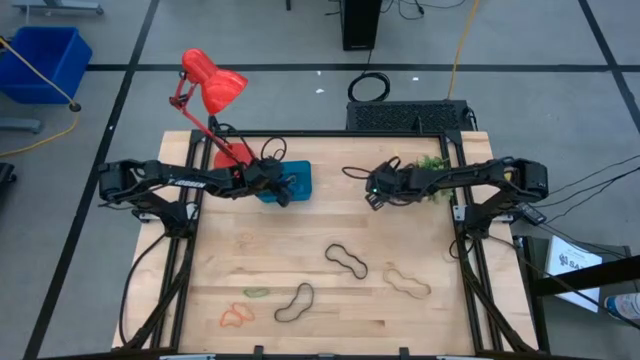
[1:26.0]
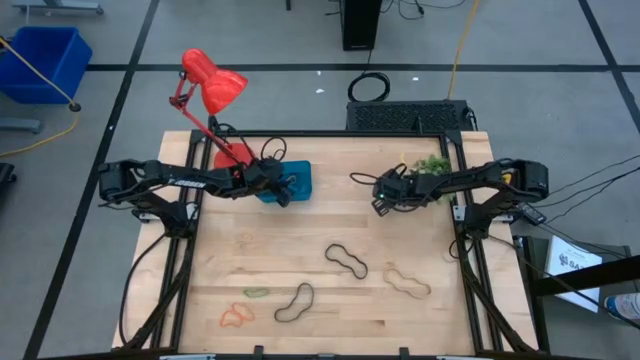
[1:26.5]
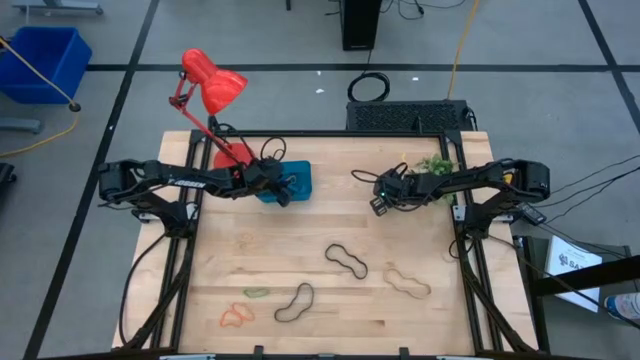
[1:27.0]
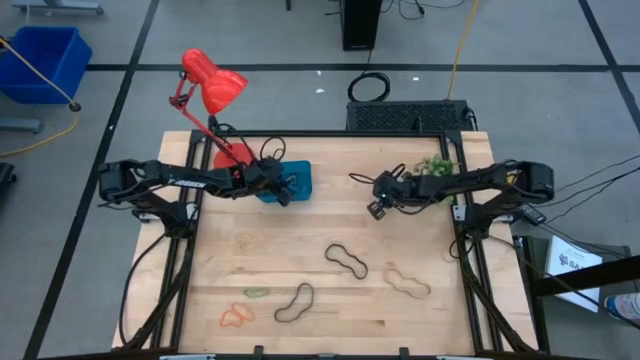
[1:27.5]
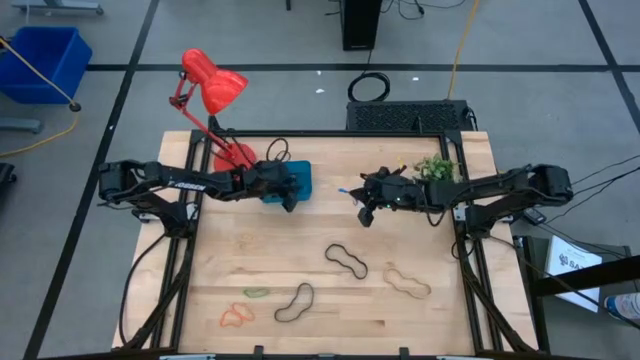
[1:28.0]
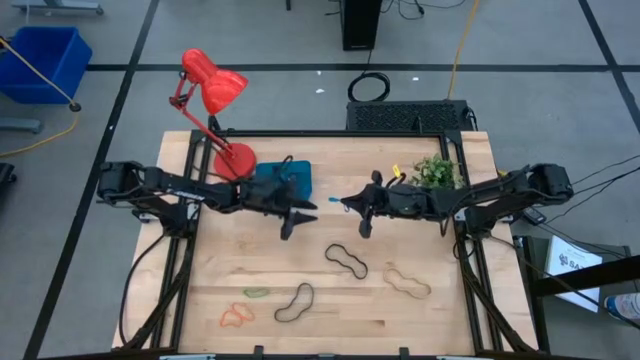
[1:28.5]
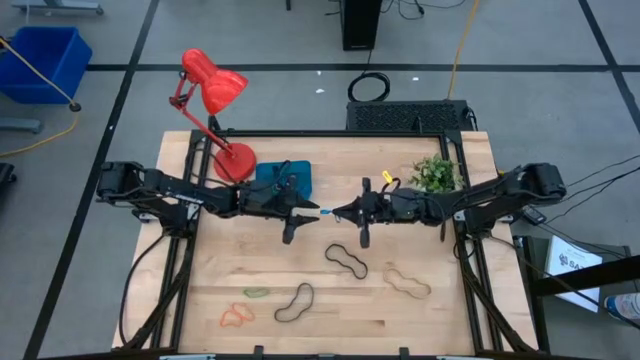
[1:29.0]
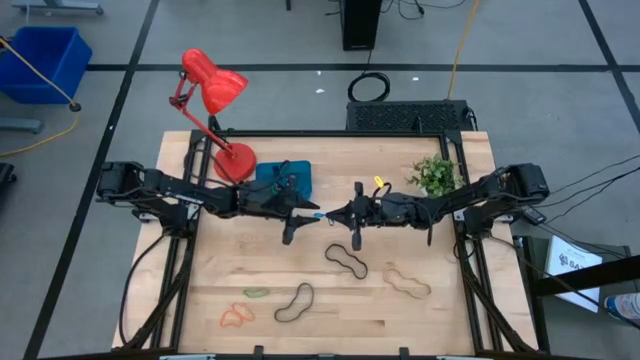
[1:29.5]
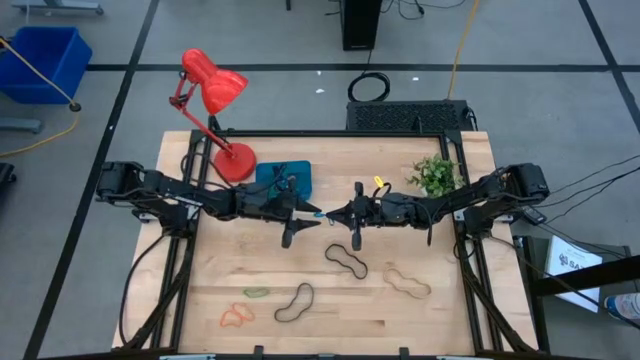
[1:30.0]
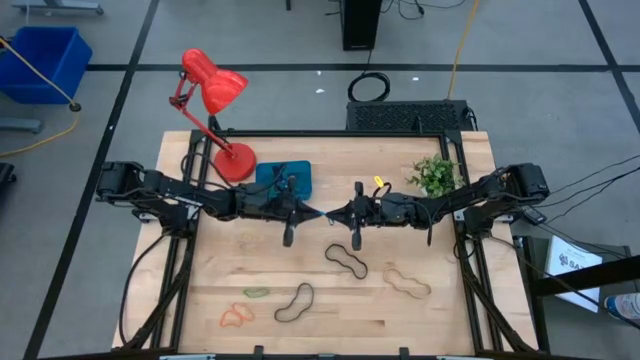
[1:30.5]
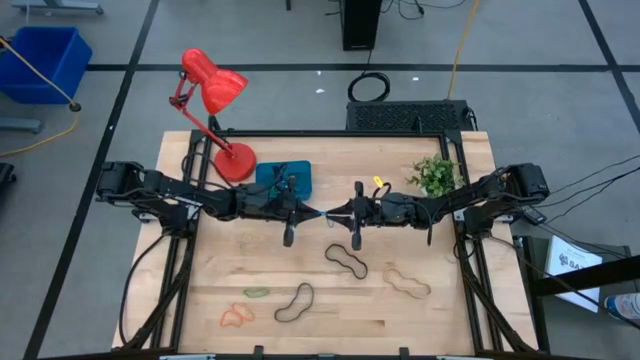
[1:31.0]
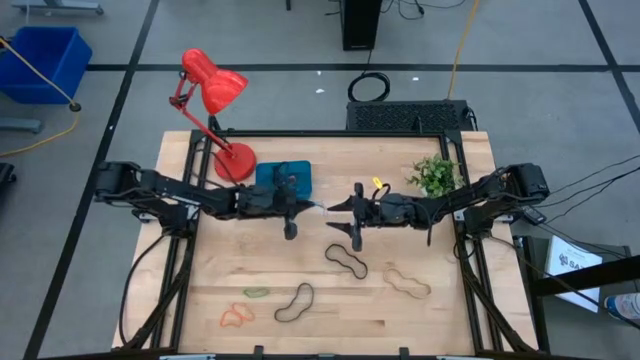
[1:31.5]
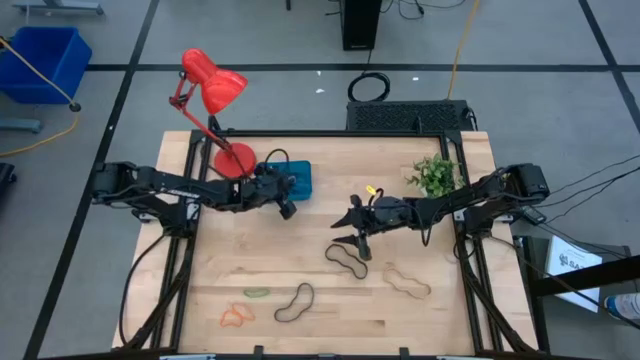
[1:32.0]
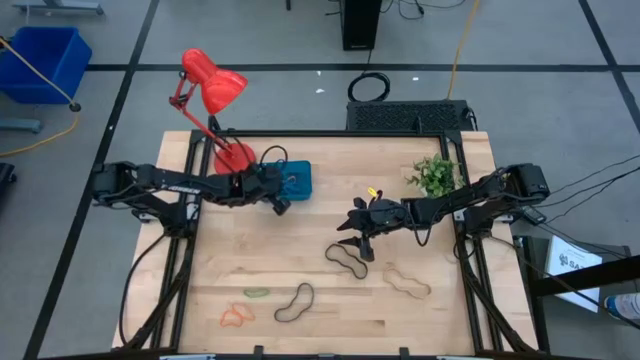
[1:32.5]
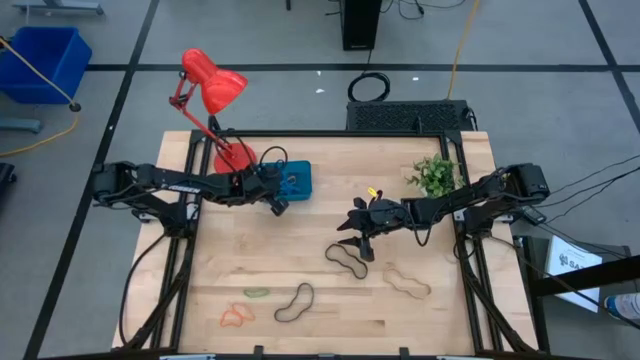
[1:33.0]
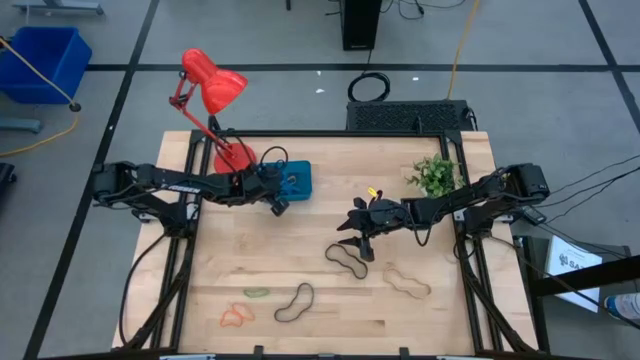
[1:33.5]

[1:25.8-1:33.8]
Task: Pick and place rubber bands into bin
Put the blue rubber band into the blue bin

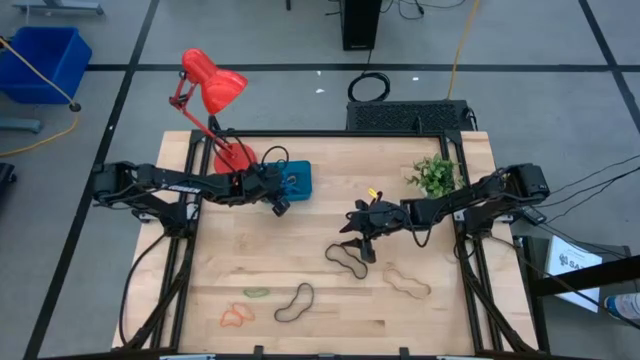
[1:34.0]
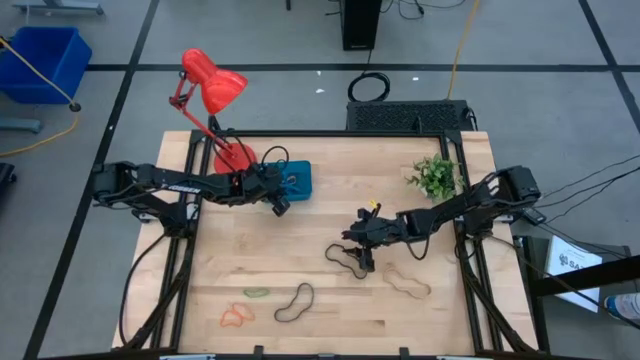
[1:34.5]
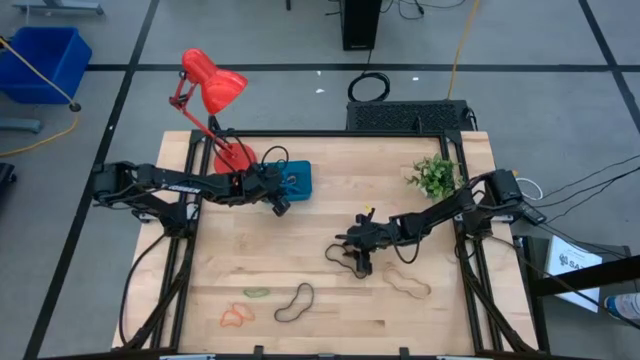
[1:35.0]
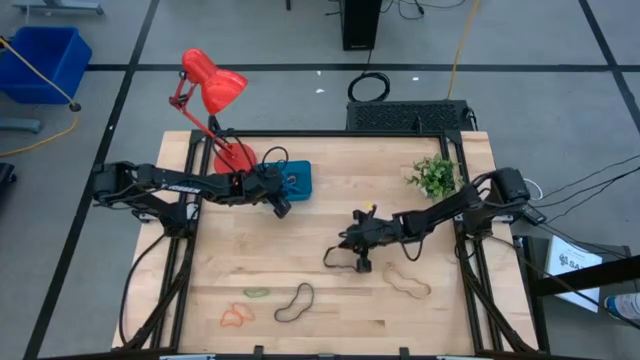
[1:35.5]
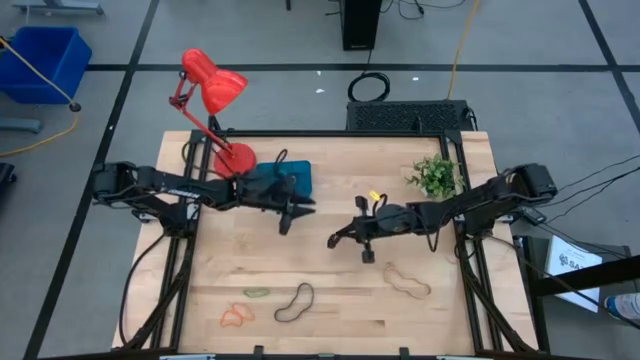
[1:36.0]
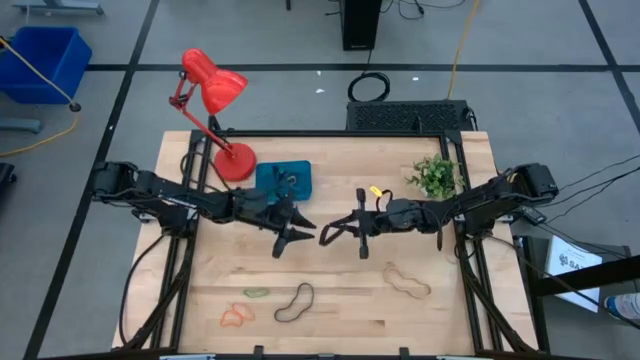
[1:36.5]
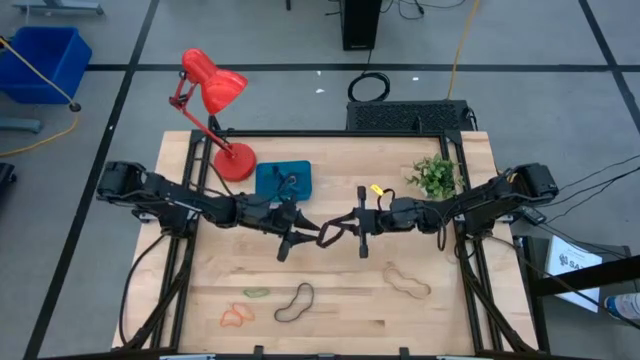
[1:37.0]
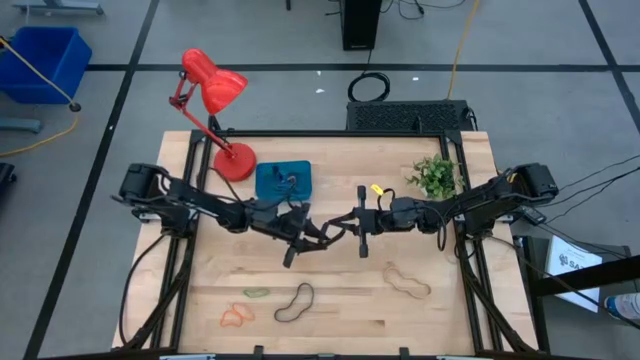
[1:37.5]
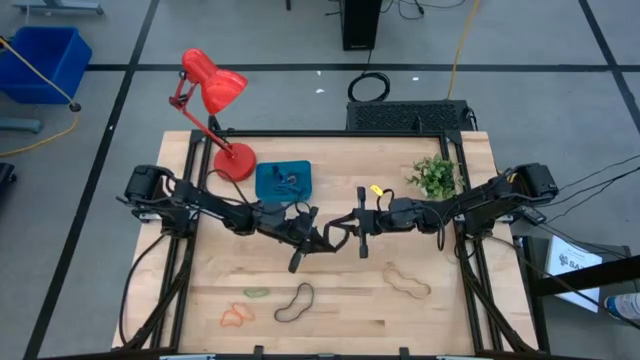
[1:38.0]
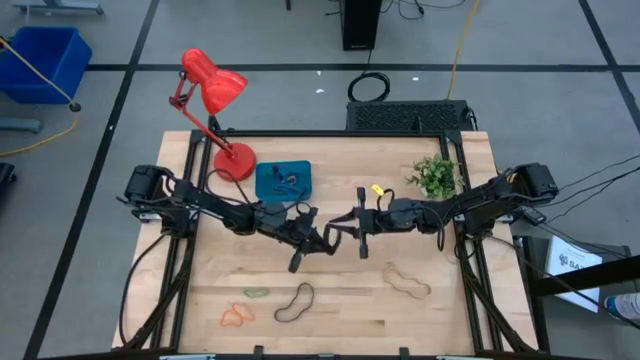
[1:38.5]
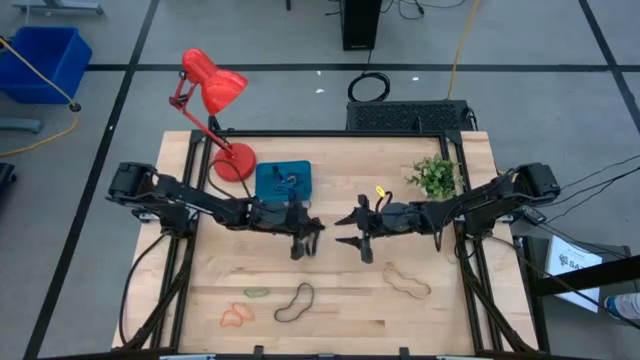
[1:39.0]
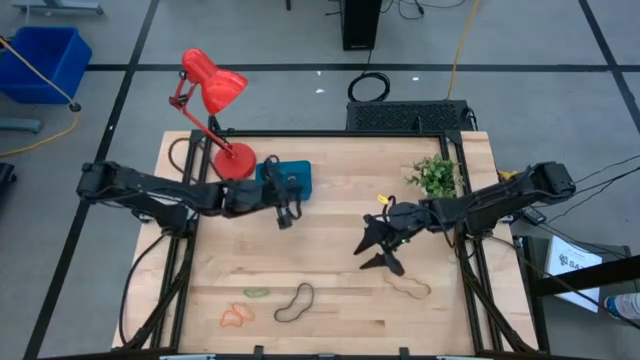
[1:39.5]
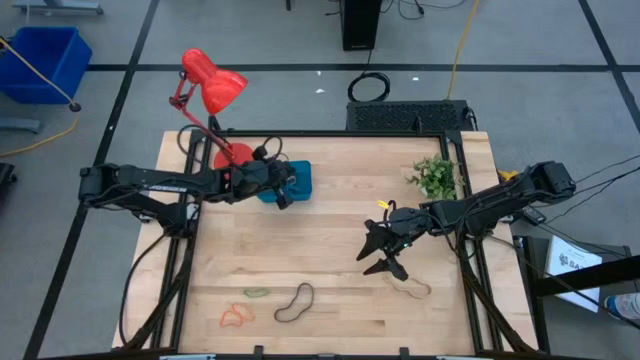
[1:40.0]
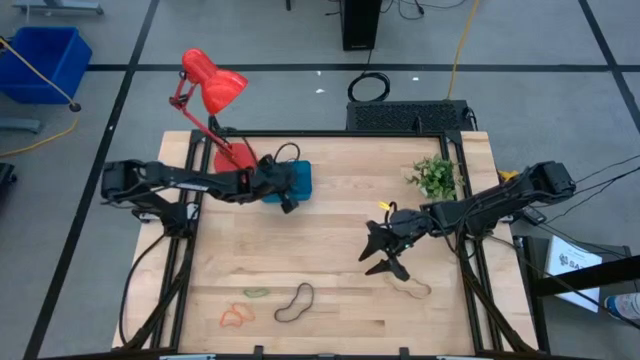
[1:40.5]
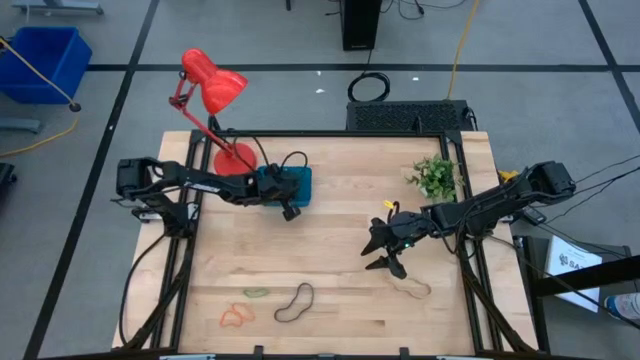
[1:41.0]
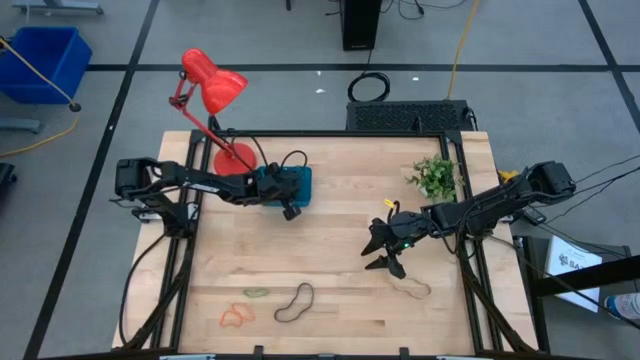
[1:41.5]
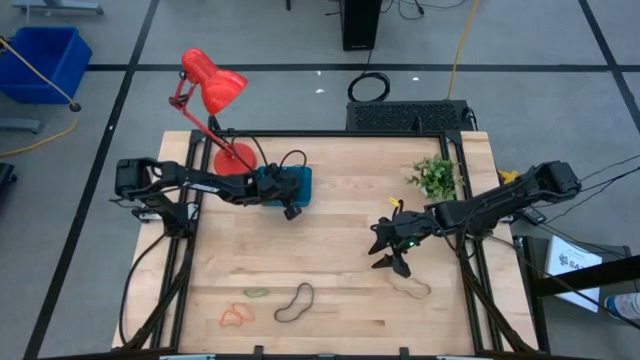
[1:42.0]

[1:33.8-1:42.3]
Put the black rubber band into the blue bin

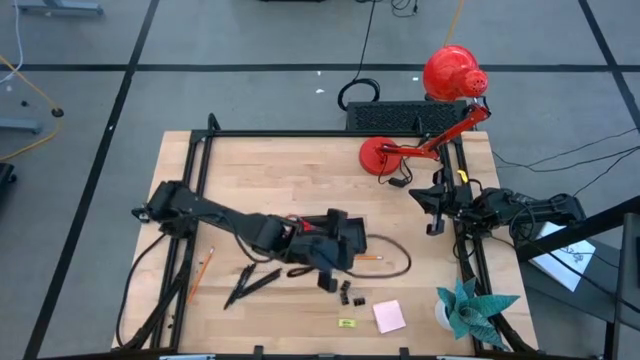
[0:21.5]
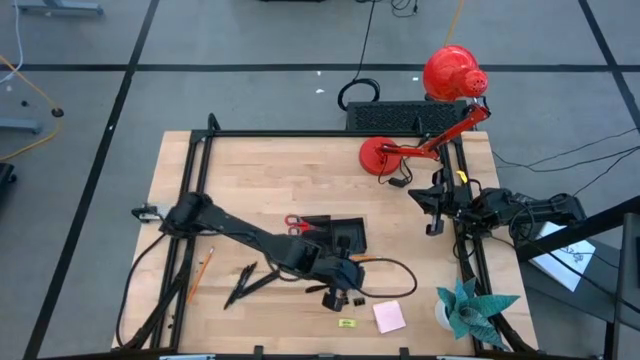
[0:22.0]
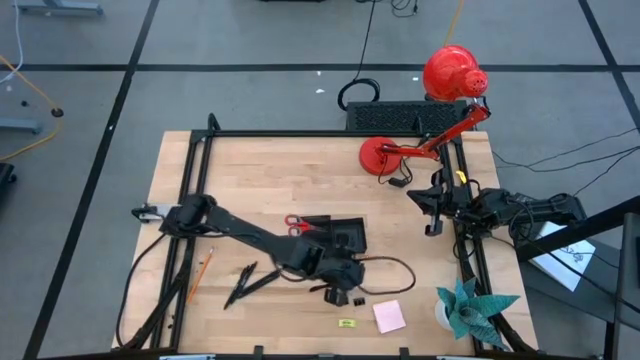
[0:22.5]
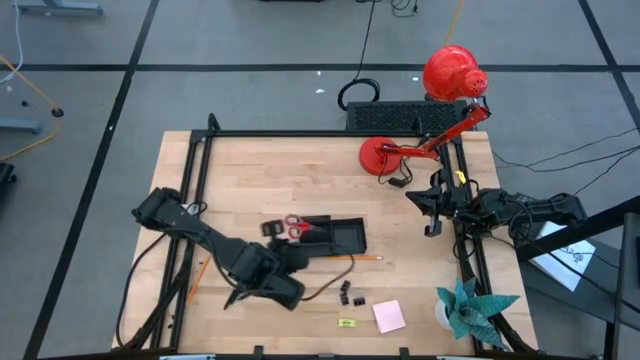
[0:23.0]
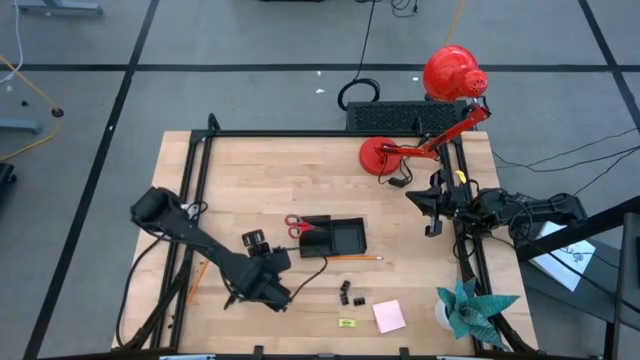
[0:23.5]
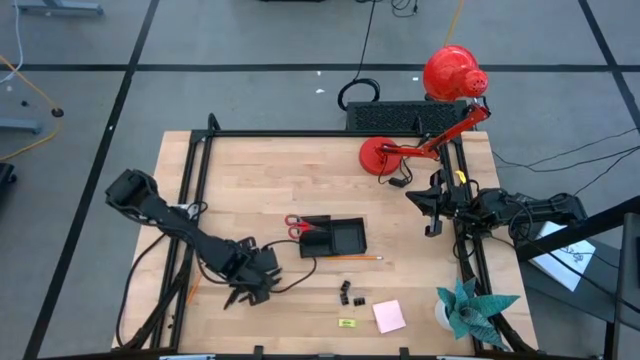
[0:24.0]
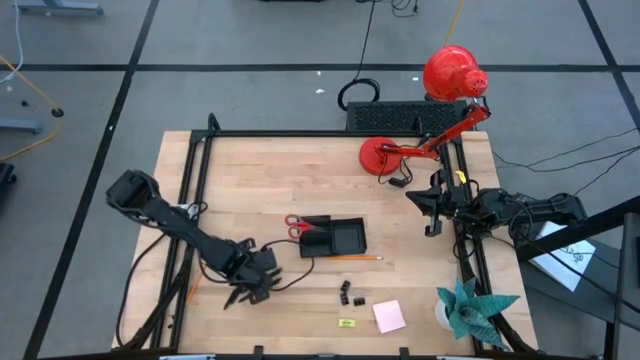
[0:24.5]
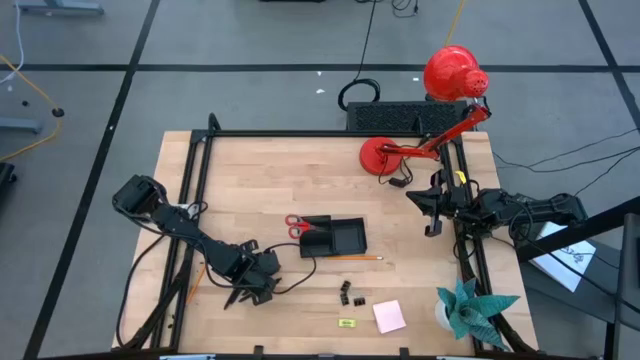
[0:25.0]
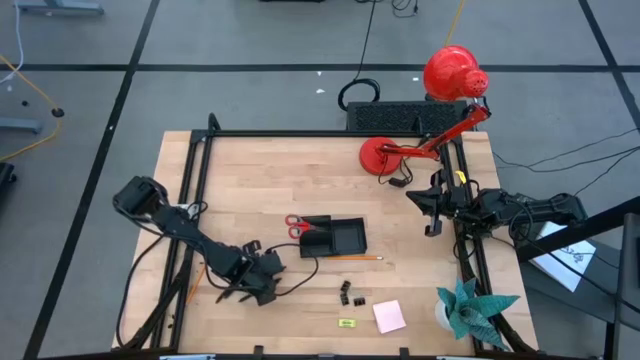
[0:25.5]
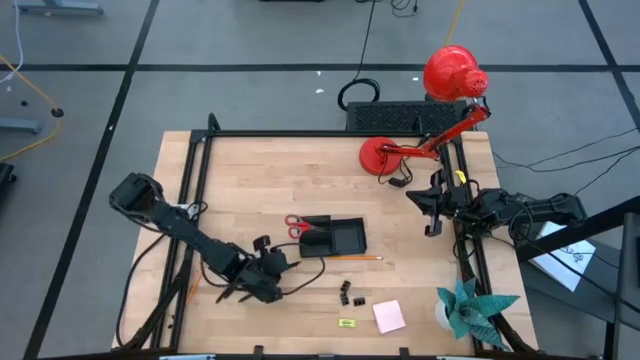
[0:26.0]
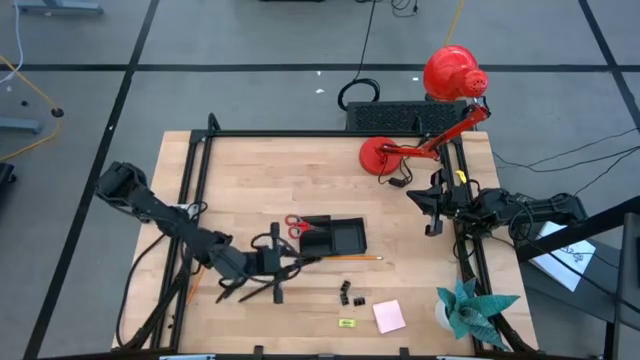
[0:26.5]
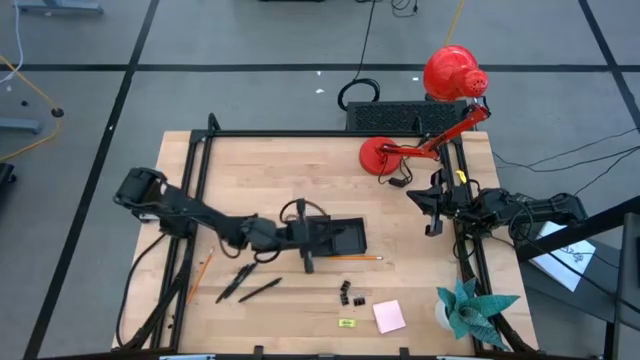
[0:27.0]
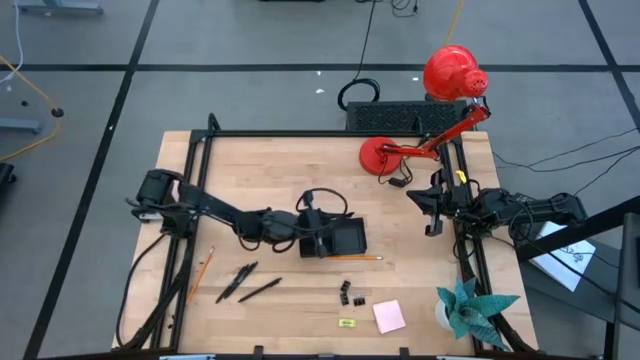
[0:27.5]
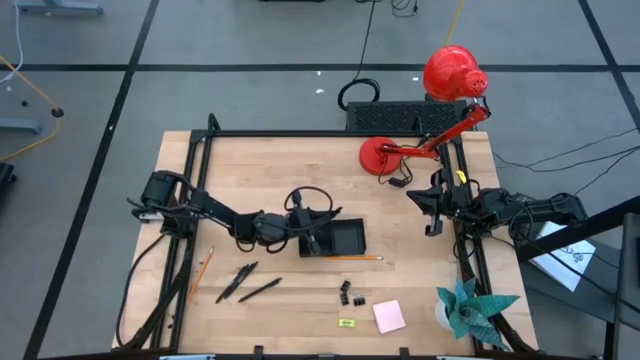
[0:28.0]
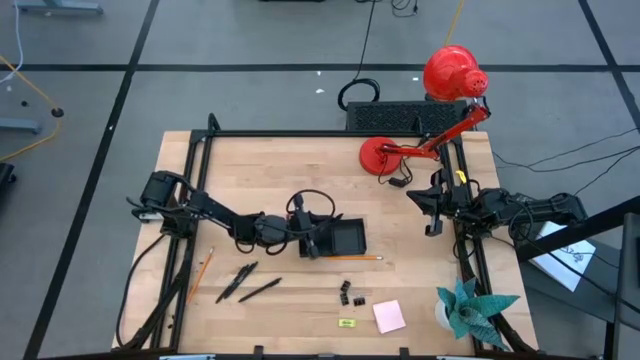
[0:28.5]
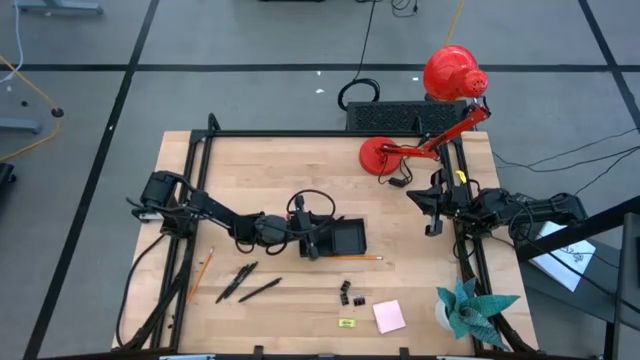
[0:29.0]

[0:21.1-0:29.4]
Task: Pick and place office supplies into organizer
Put the pen into the top left compartment of the desk organizer
